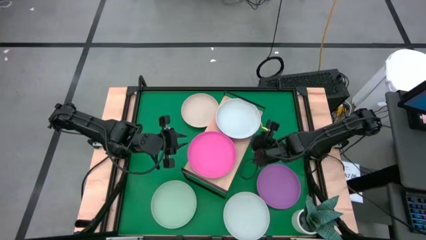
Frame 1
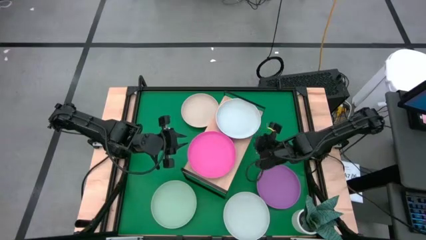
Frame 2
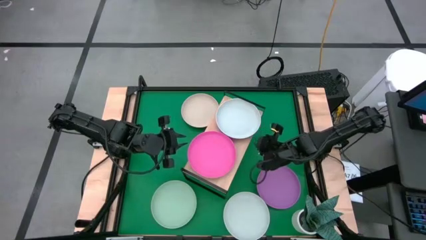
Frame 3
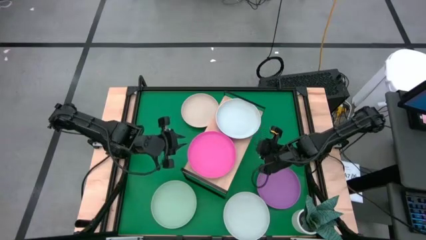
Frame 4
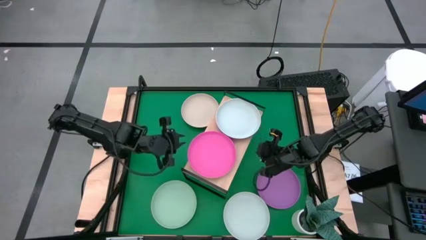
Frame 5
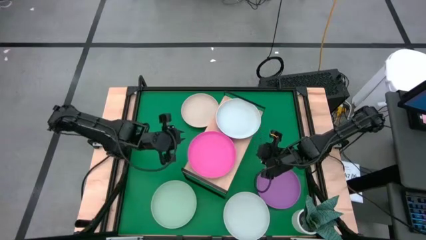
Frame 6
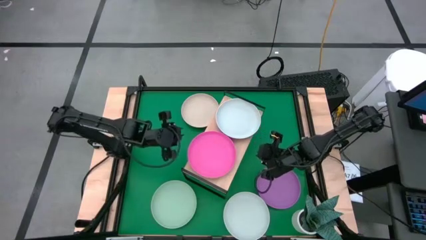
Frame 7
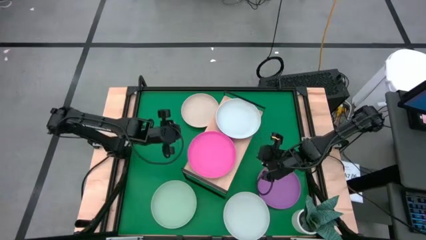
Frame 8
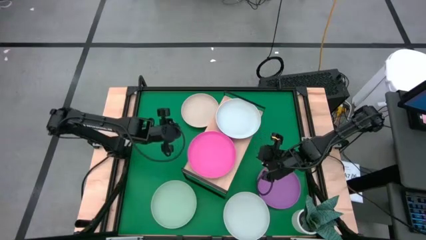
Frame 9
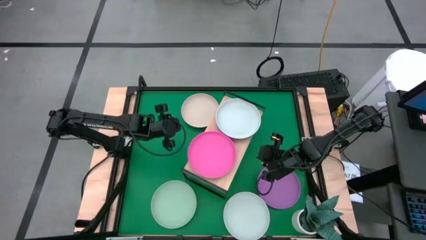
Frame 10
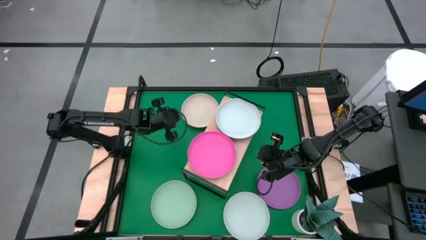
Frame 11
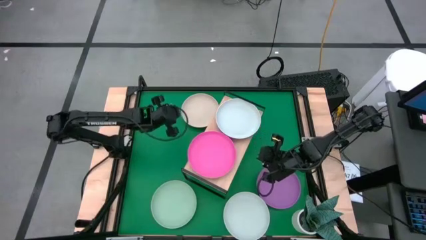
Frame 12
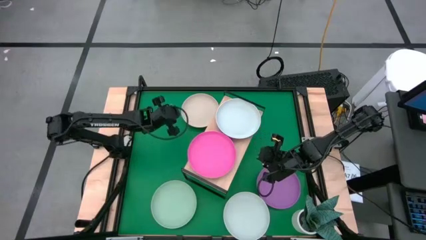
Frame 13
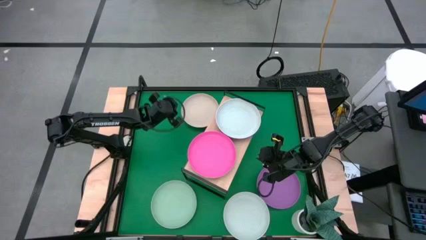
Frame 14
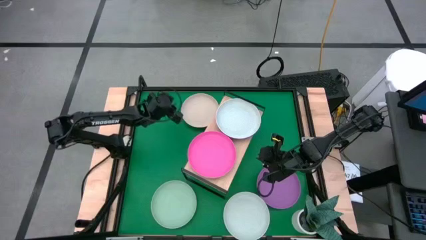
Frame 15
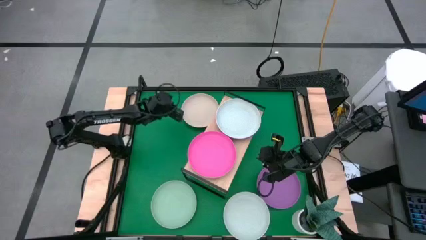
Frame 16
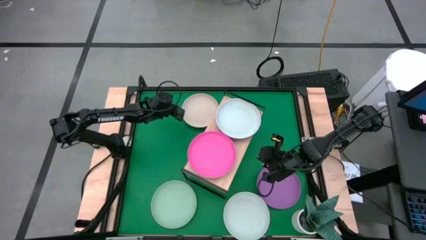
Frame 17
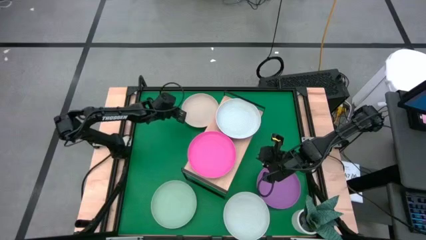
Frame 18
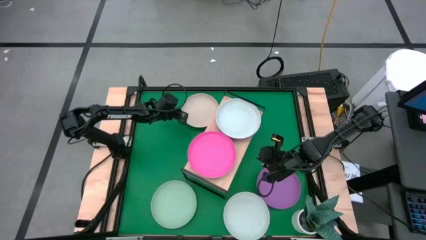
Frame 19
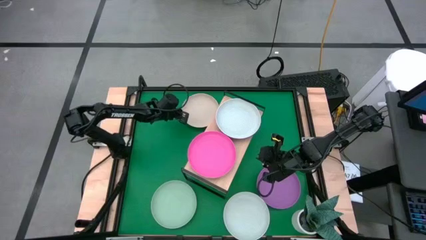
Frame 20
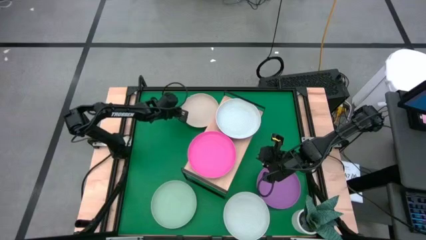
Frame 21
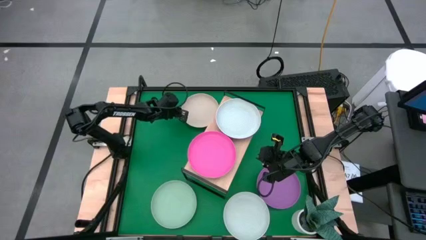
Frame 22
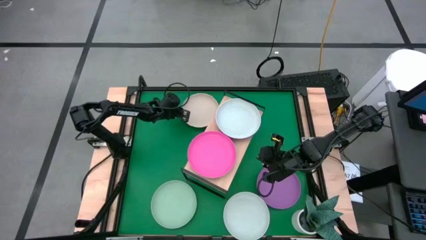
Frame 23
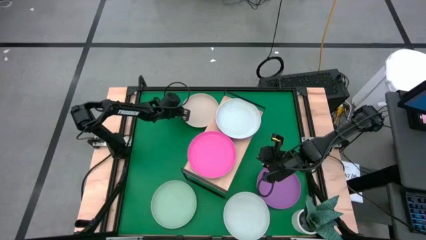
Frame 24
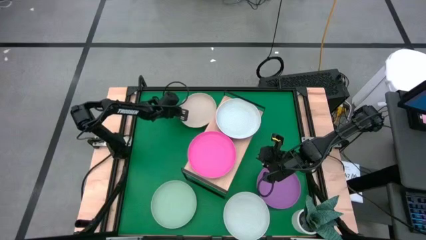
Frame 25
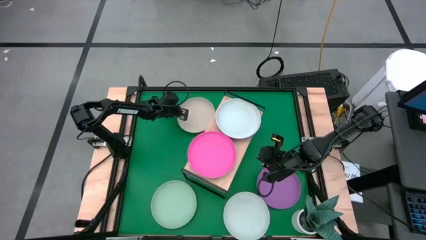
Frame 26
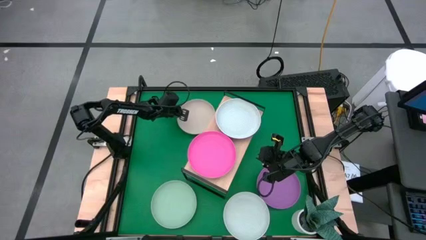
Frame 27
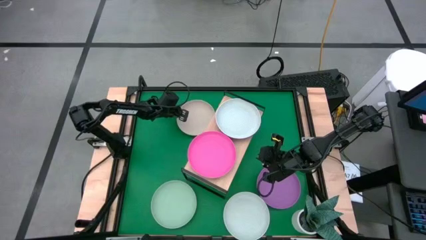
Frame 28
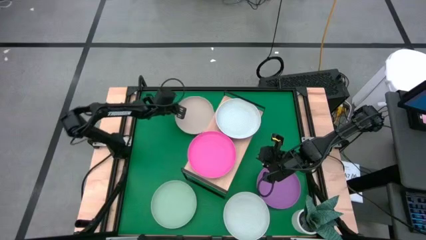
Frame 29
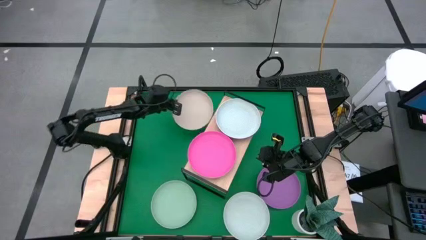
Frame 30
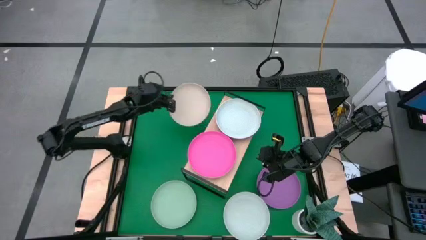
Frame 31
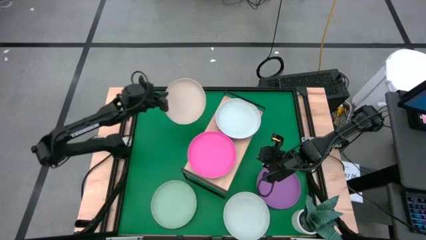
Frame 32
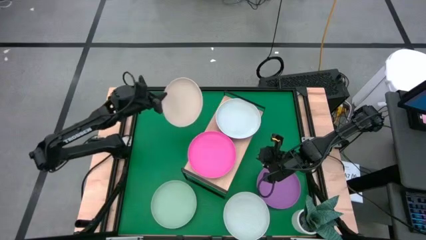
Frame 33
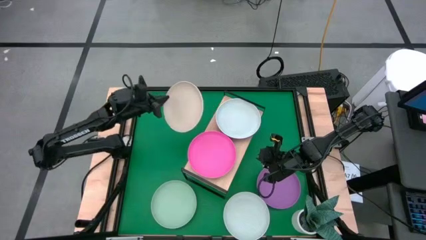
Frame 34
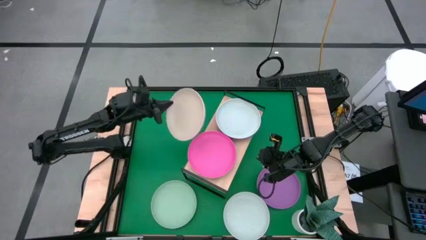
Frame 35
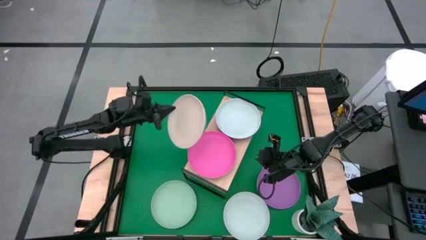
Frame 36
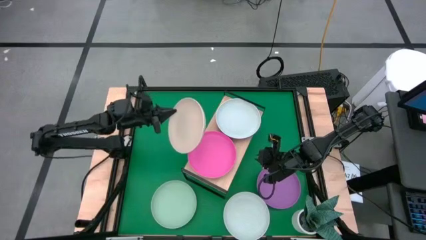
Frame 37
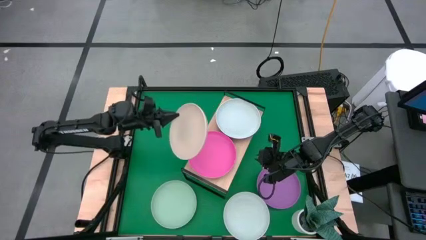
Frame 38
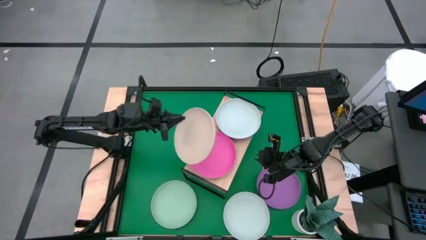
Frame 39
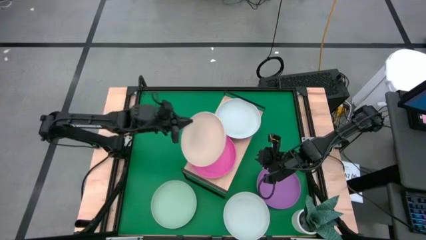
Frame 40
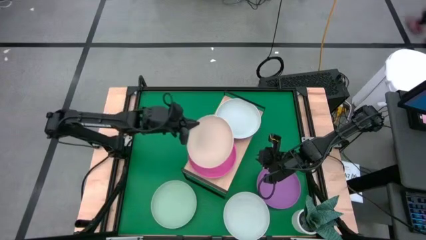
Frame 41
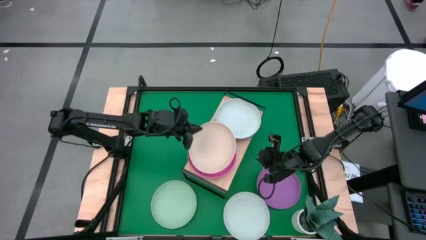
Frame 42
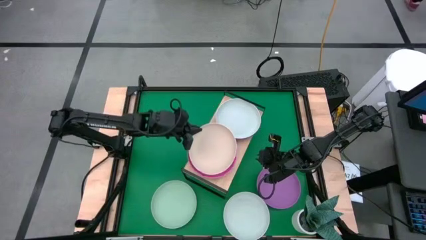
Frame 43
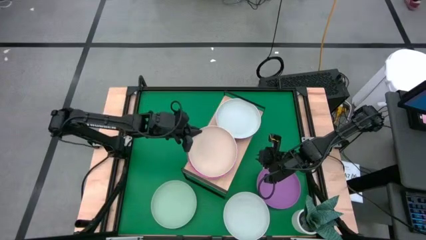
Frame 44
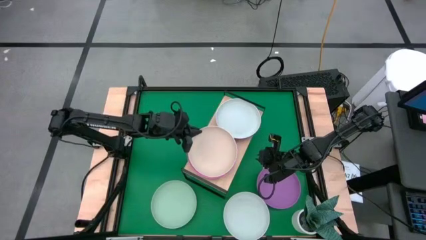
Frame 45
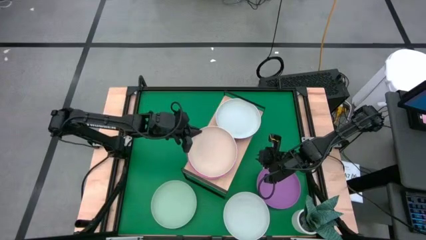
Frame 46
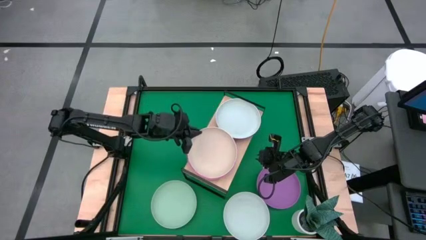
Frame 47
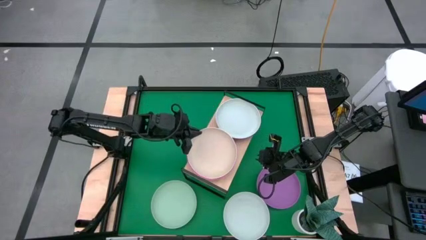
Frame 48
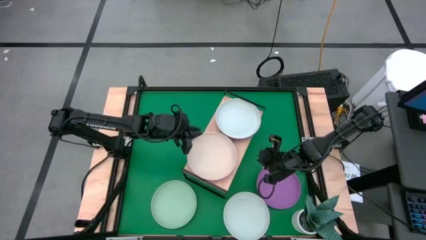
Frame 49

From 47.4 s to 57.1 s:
Task: Place and stack plates onto a shelf
Stack the light orange plate on top of the pink plate on the shelf

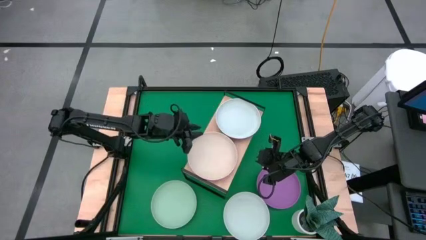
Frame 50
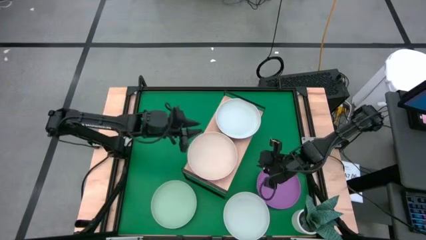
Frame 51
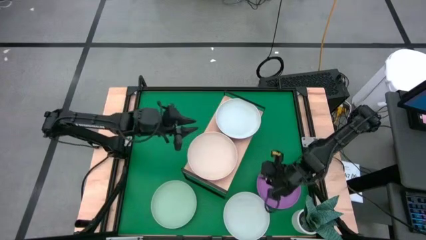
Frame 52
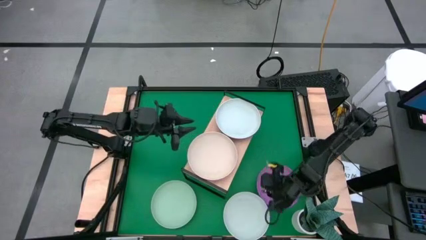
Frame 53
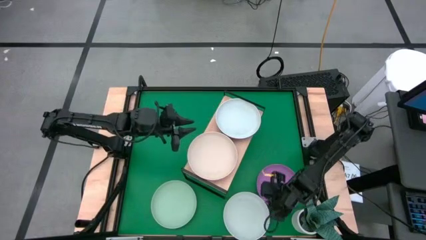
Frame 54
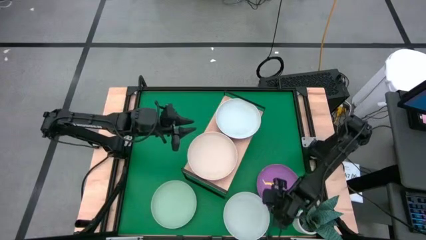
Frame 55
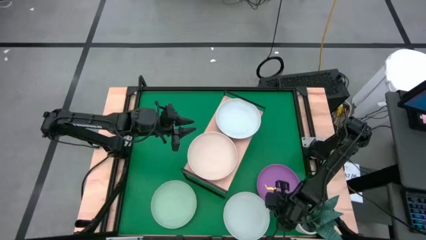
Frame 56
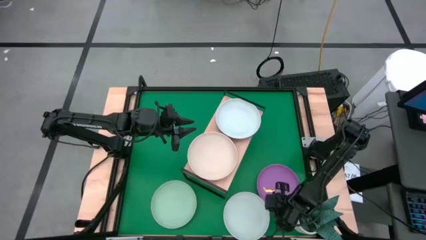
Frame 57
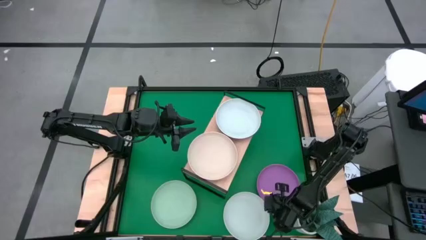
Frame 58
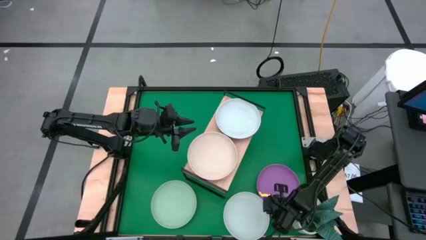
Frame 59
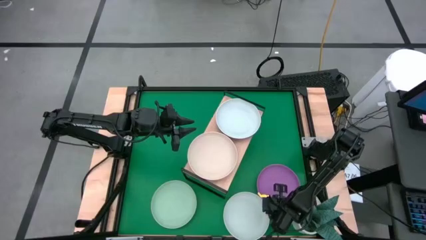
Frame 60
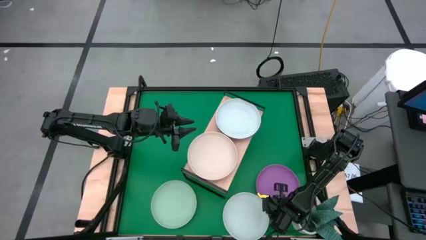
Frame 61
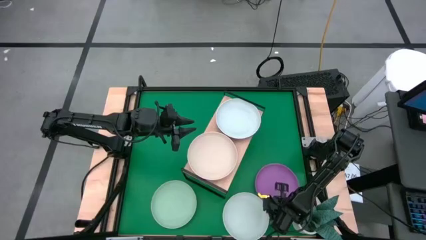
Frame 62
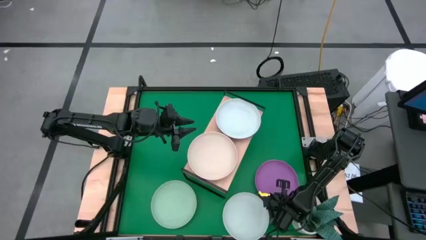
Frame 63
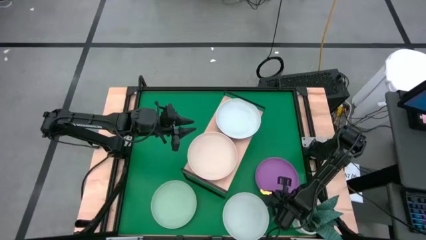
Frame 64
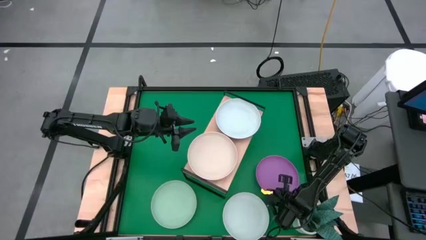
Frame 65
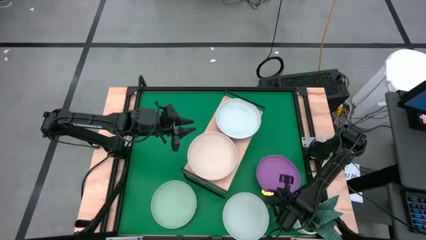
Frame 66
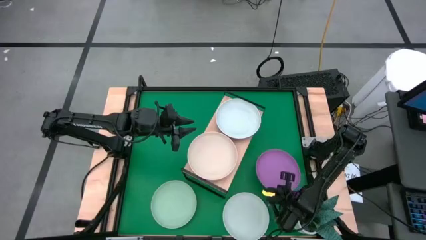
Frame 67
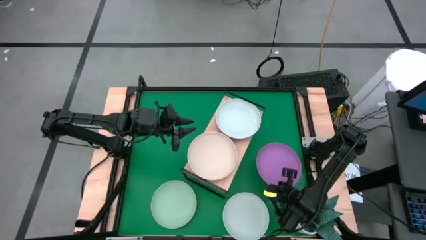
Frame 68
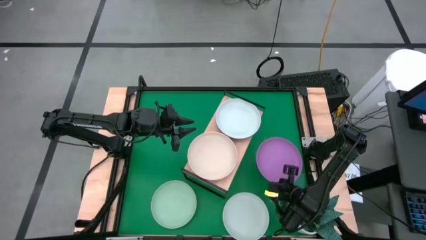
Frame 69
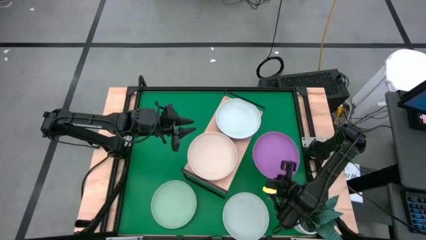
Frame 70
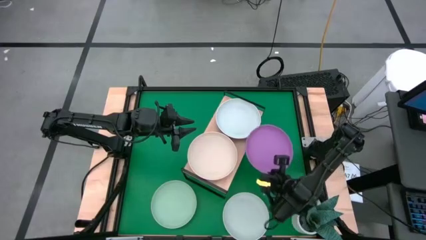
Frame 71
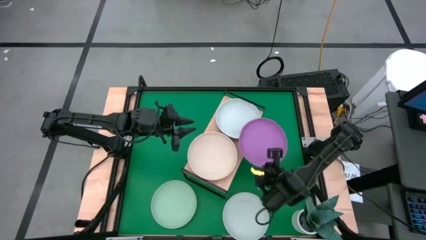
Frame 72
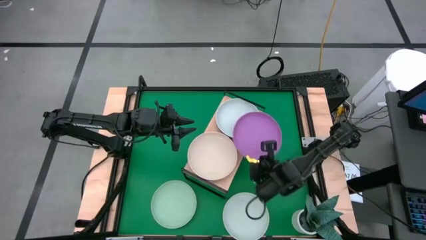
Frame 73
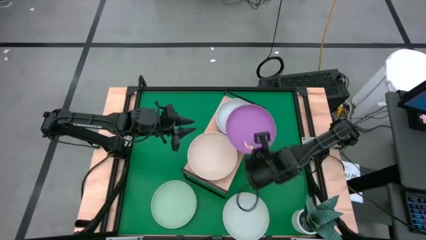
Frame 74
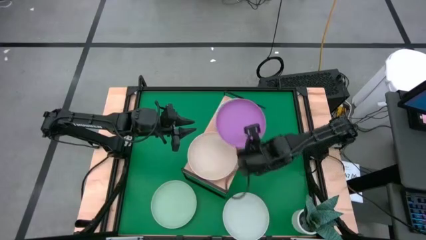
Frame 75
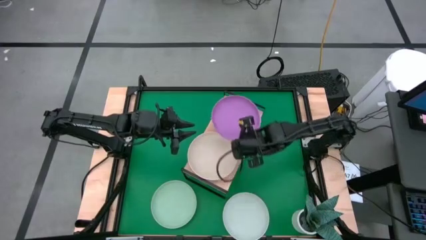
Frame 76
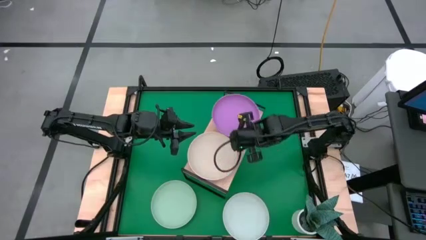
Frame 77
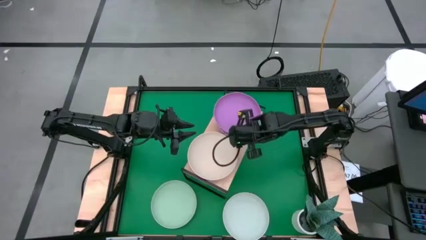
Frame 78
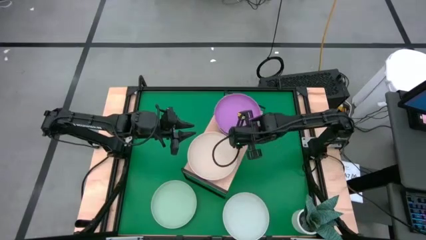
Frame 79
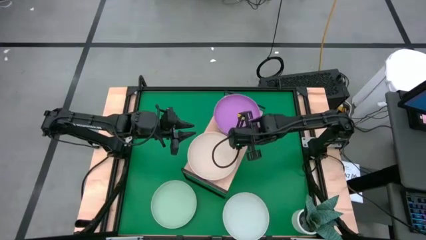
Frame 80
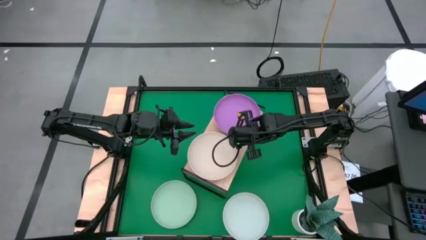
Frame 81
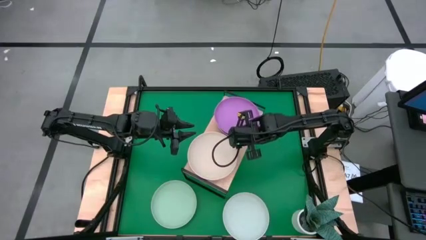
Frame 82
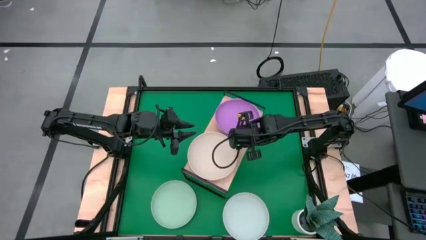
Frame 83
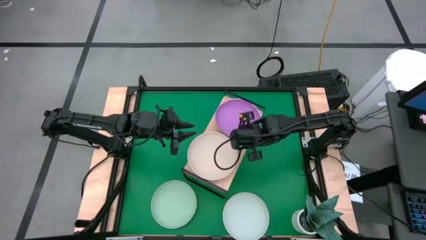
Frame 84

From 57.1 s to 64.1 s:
Stack the purple plate on top of the white plate on the shelf
